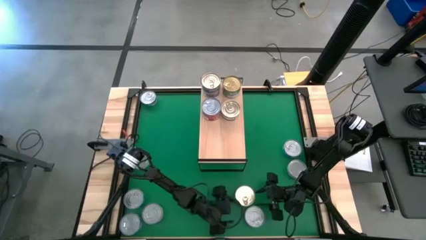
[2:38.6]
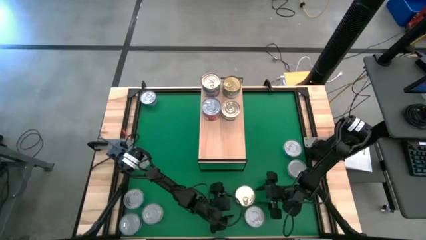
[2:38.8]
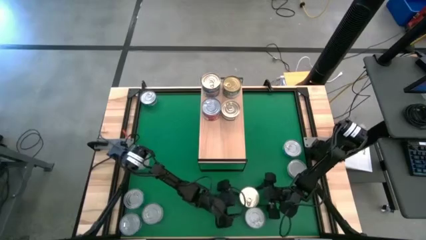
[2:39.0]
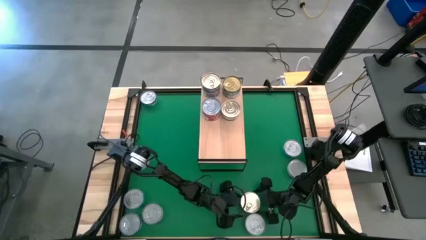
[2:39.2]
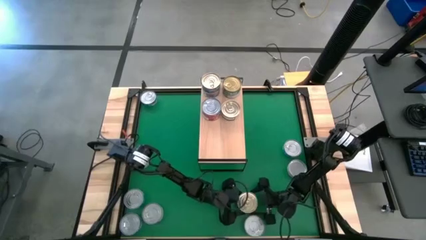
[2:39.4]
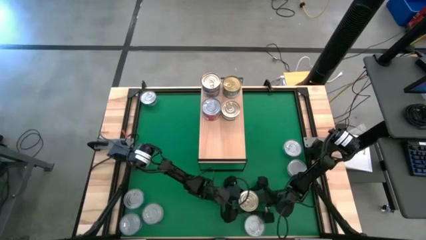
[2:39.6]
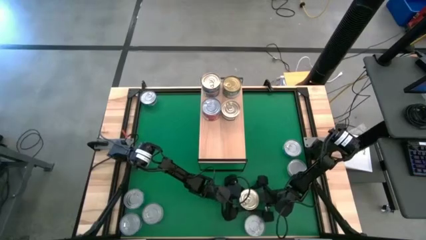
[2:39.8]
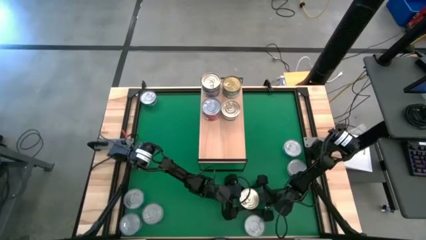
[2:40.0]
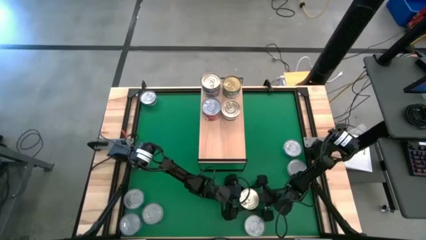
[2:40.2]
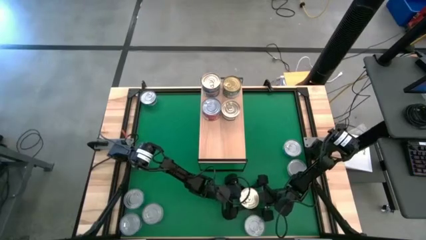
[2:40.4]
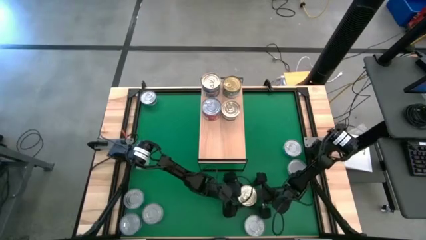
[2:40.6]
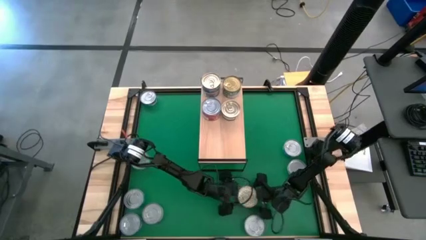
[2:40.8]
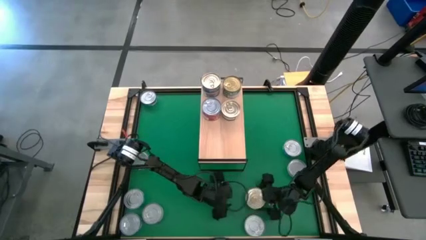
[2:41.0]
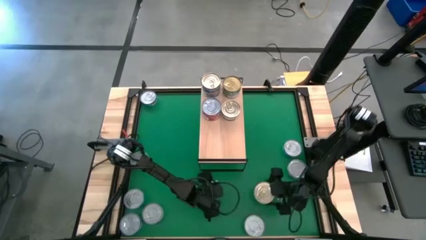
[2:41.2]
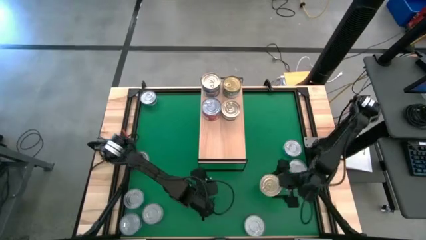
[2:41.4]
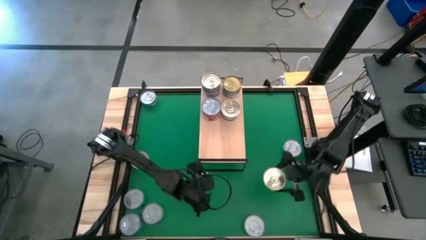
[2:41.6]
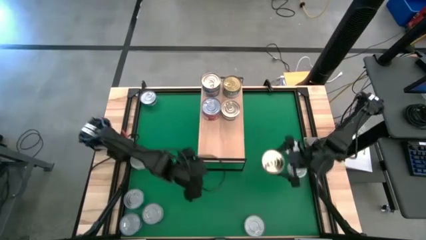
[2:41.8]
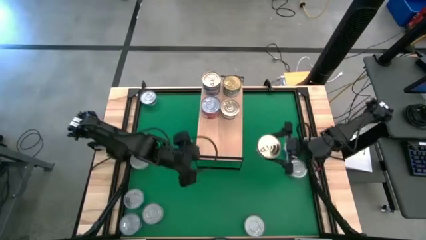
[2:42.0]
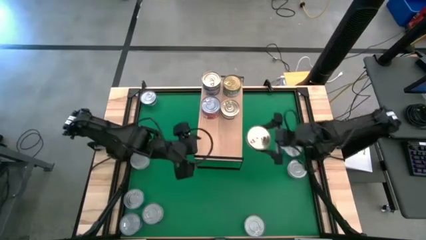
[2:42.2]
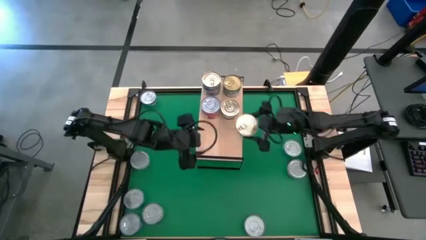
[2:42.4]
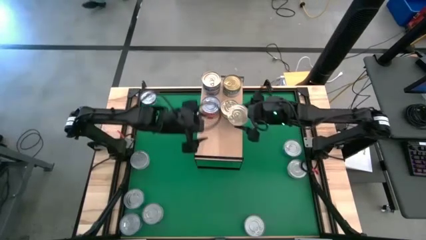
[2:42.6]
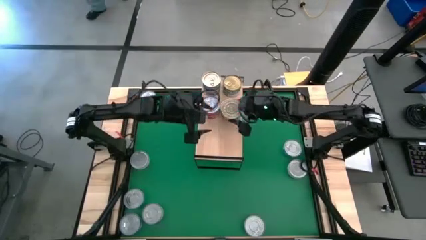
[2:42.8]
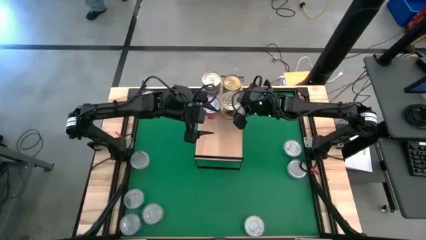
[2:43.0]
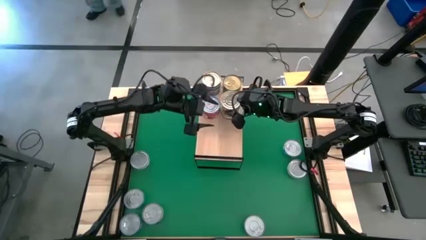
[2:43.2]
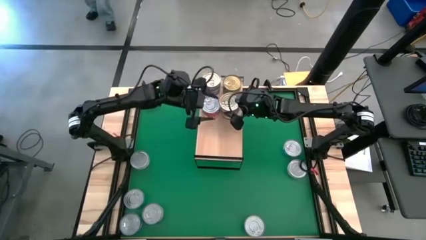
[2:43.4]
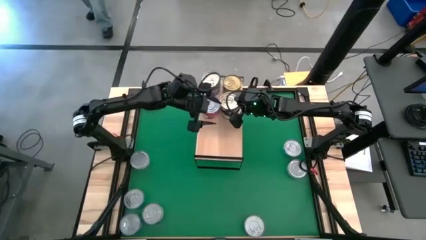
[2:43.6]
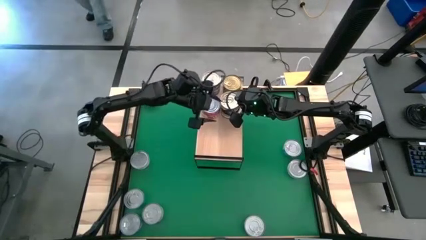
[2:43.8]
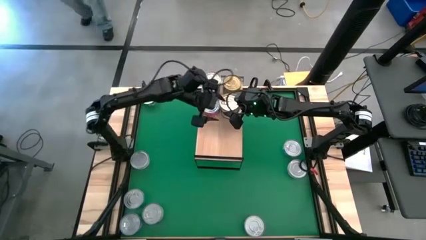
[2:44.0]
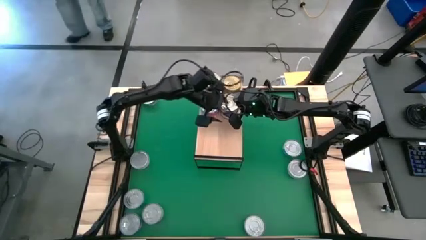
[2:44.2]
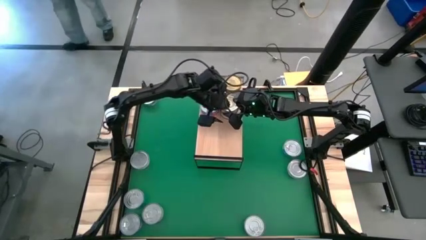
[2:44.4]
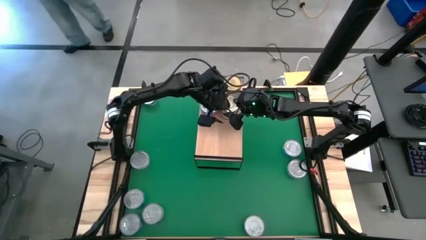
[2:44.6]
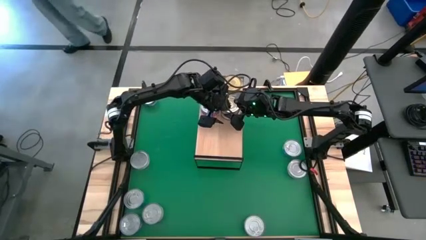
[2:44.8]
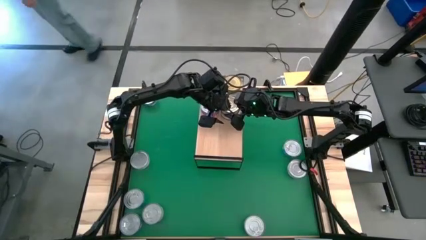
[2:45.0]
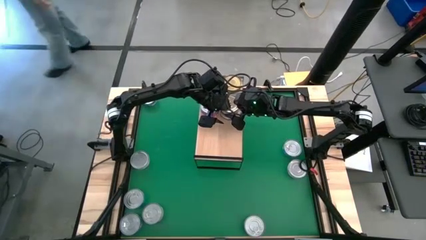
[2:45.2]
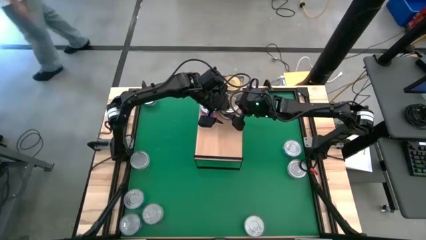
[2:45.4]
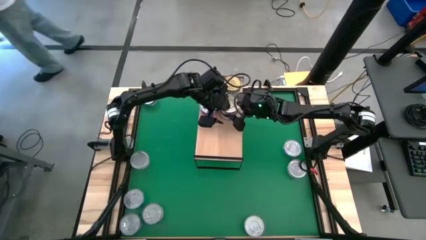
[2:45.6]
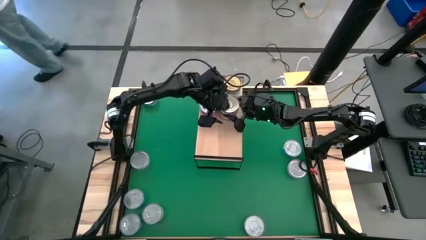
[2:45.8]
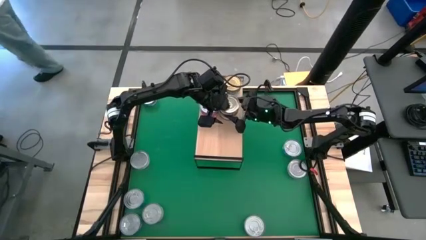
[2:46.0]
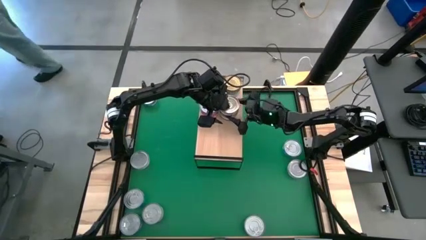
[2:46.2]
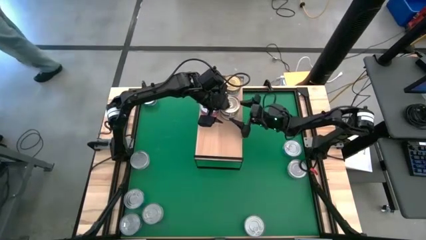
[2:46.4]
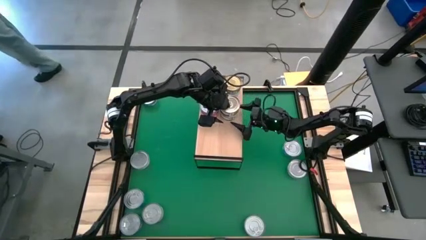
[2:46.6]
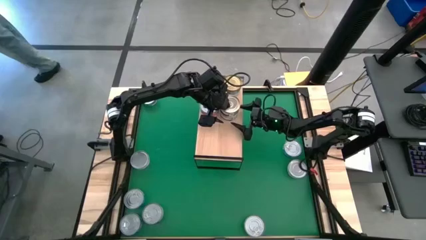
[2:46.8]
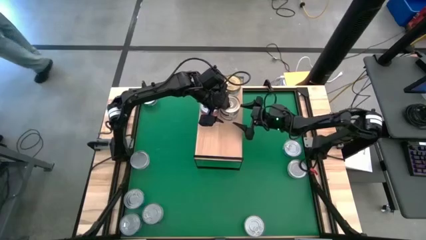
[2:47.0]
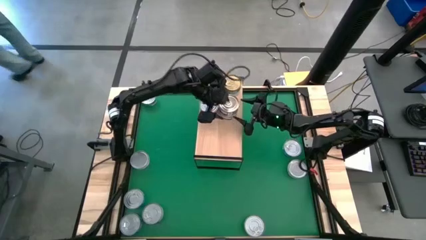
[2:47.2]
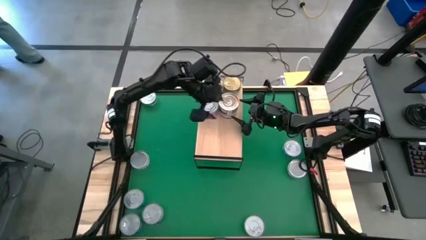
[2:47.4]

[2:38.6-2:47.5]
Task: Stack canned seafood by type on shelf
Stack the blue pink tuna can on top of the other blue pink tuna can on the shelf

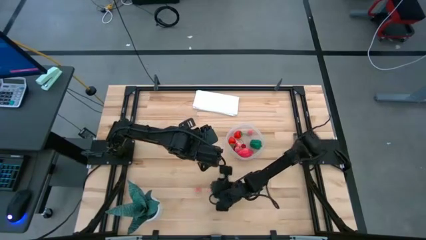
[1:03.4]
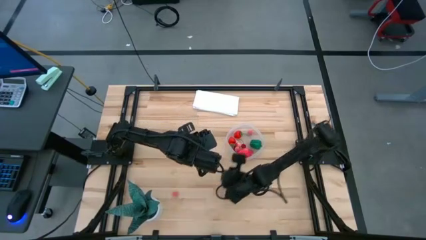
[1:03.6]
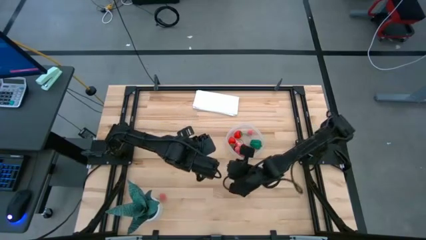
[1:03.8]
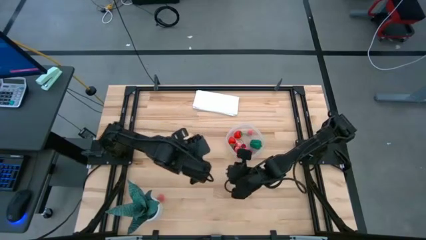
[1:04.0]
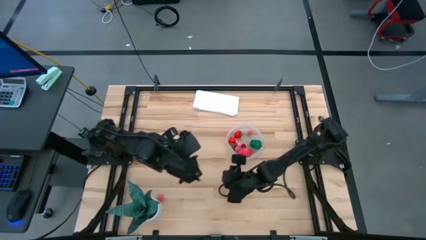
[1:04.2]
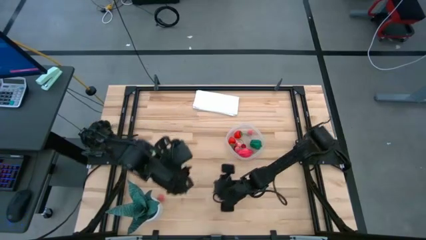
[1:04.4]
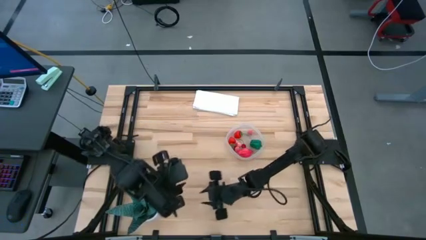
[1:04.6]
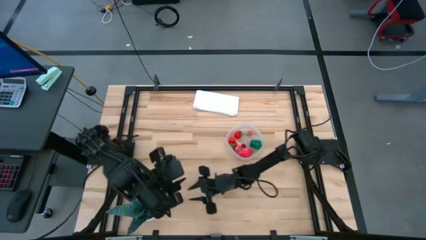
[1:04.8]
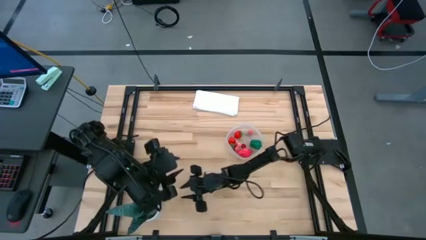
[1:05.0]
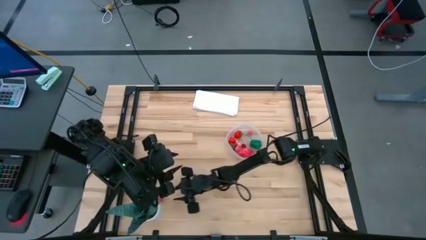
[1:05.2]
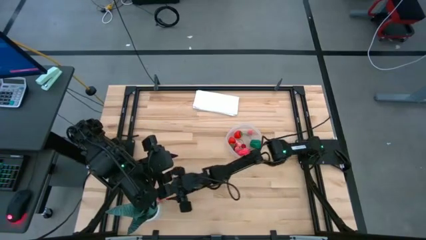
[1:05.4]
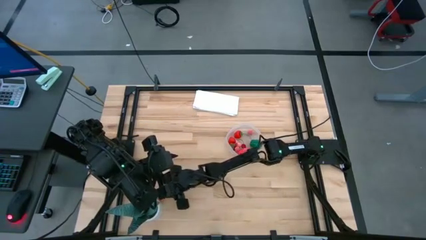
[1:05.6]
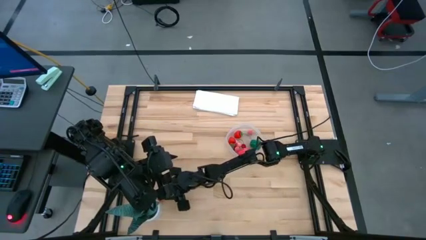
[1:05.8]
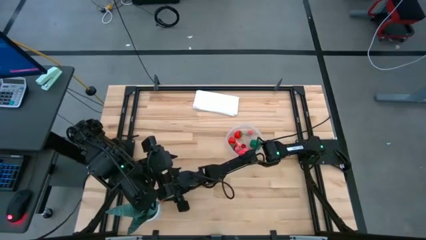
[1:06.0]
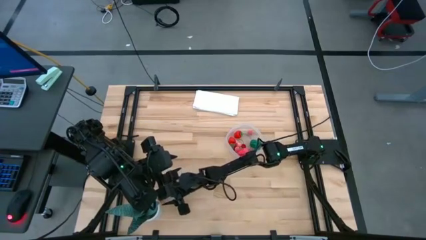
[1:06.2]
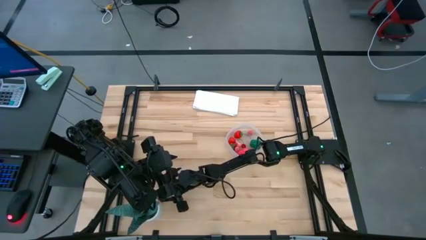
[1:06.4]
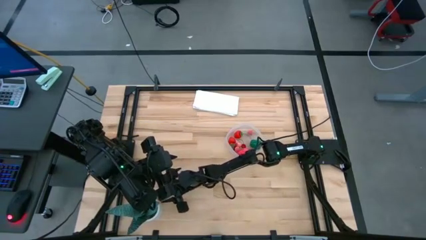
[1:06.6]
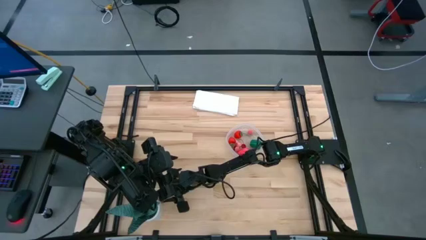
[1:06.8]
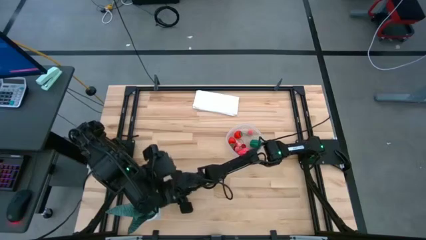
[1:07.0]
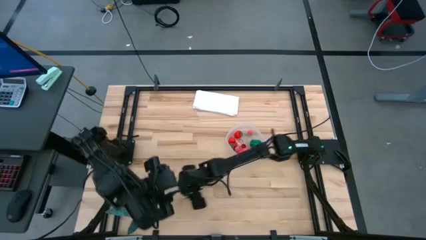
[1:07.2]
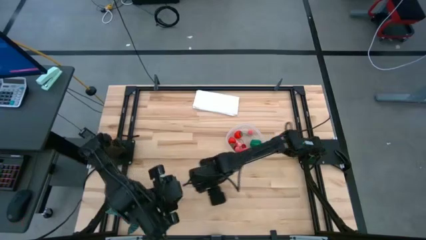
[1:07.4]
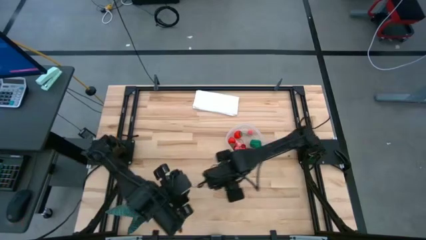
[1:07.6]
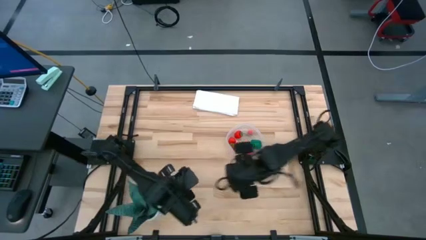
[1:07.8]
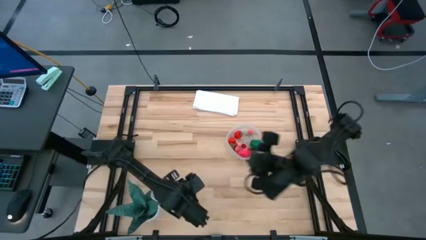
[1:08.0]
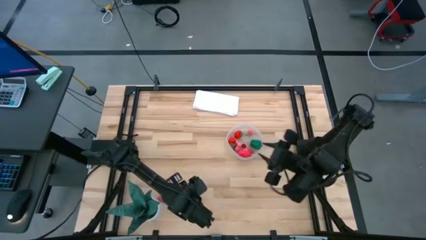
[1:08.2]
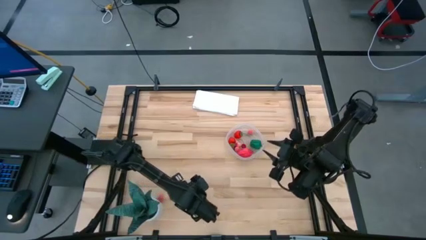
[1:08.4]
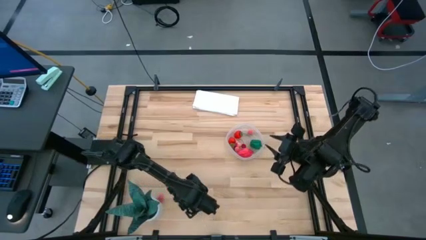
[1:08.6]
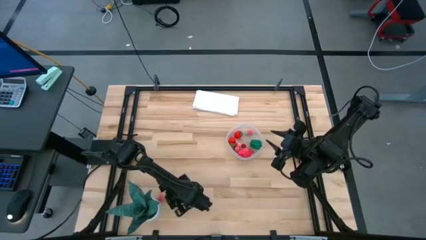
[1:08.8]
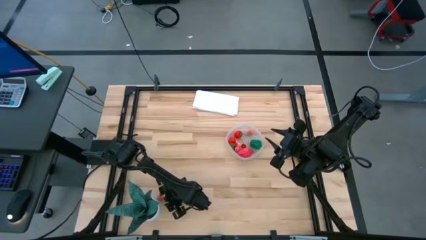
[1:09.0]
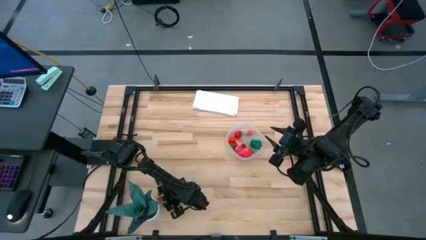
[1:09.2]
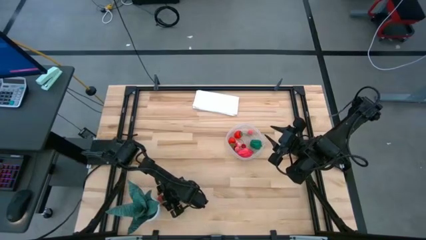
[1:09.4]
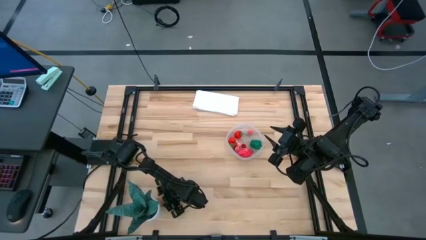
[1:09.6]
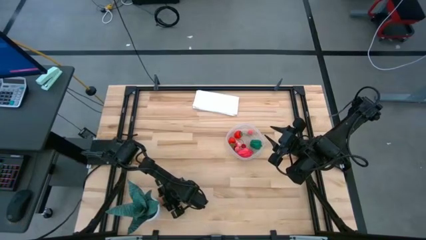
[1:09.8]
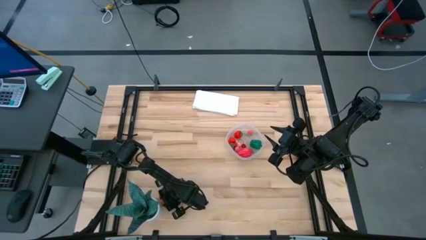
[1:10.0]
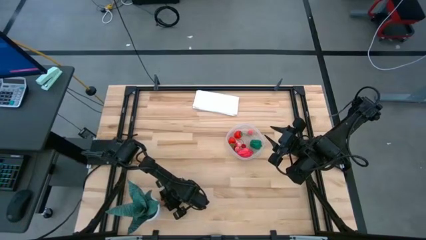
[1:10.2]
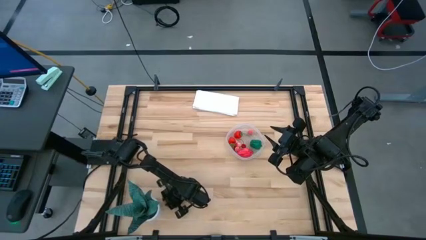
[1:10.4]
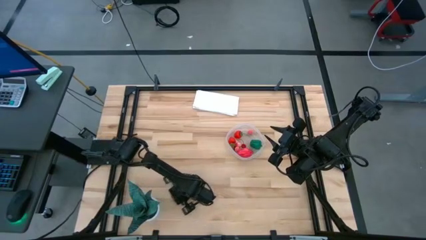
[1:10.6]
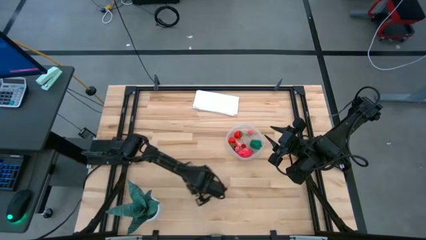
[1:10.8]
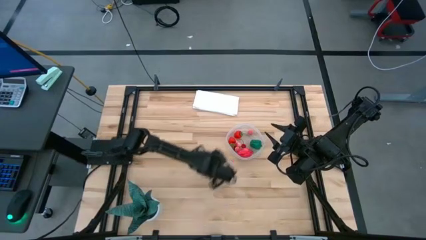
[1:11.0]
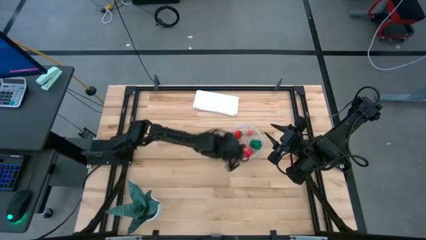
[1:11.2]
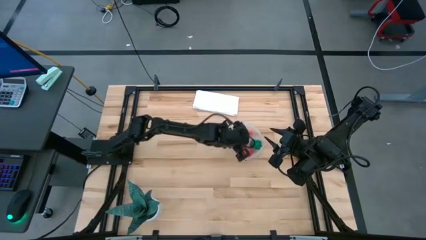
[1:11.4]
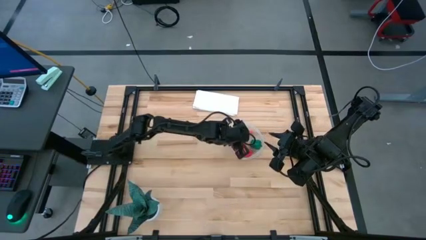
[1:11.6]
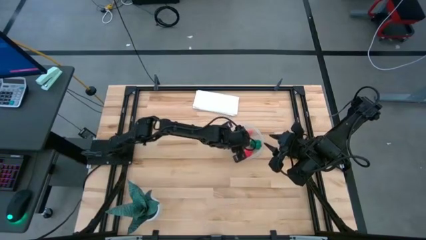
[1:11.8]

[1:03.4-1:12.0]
Task: Pick and placing Produce into tupperware
Put the pink peach into the transparent bin
